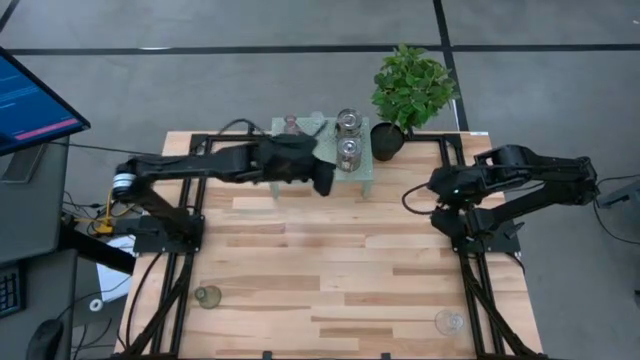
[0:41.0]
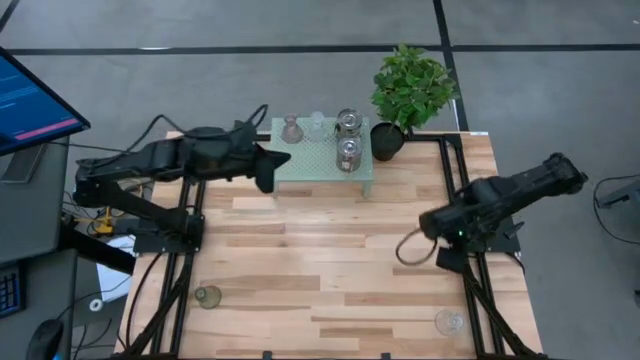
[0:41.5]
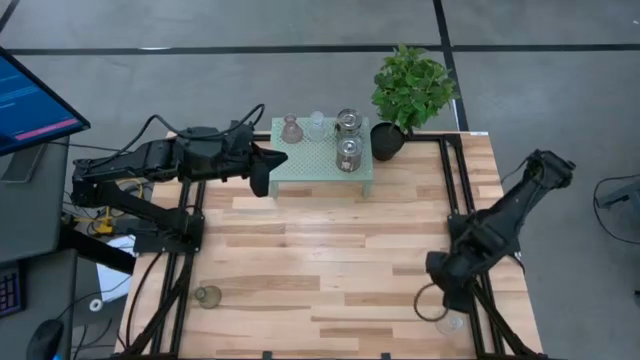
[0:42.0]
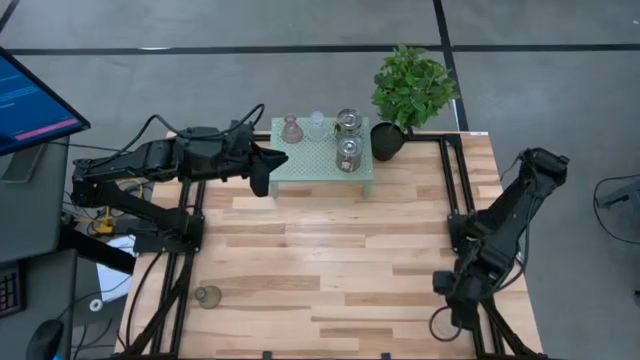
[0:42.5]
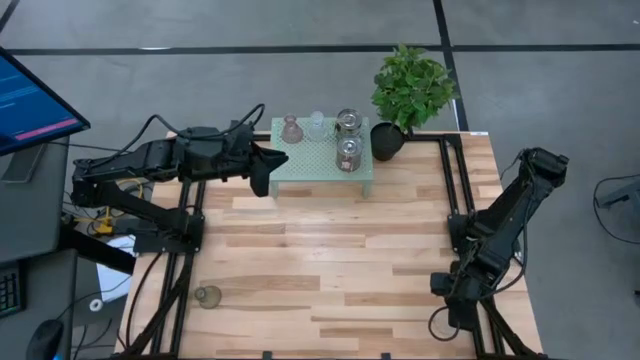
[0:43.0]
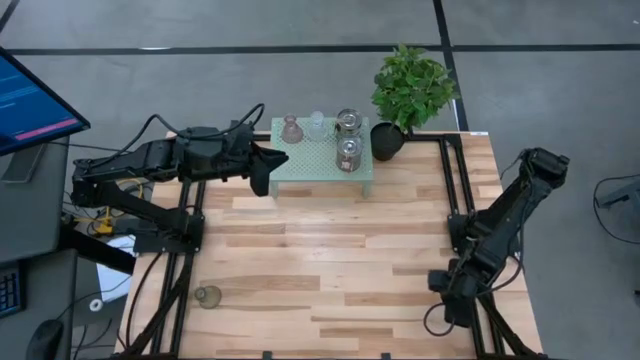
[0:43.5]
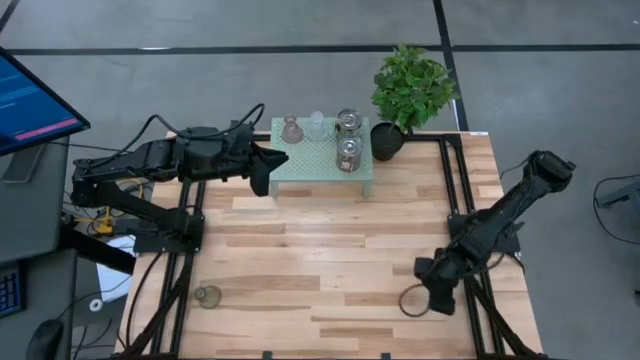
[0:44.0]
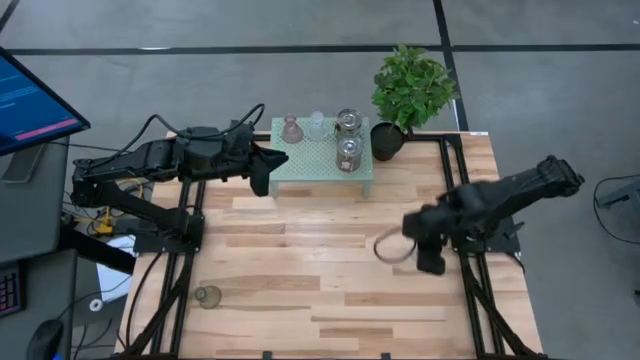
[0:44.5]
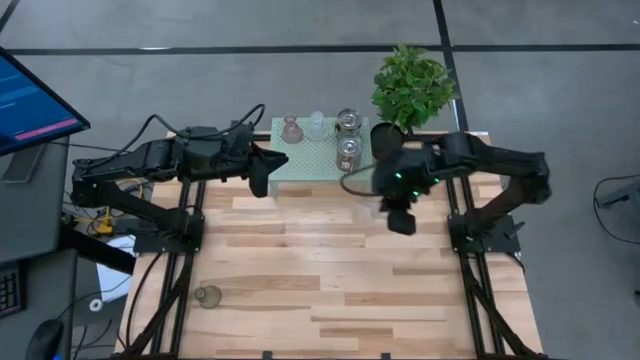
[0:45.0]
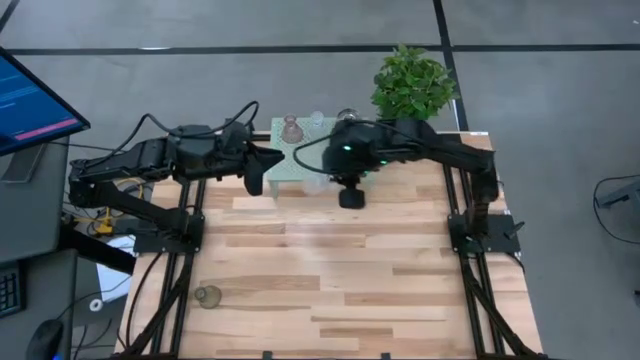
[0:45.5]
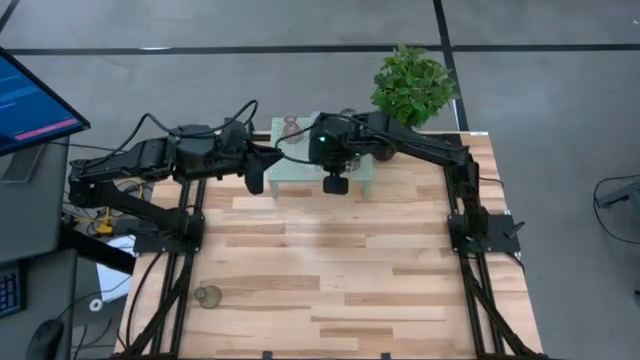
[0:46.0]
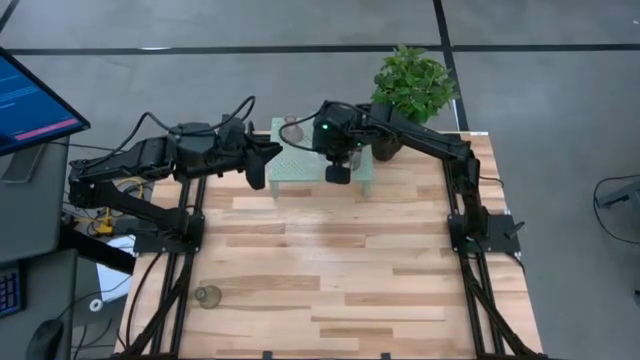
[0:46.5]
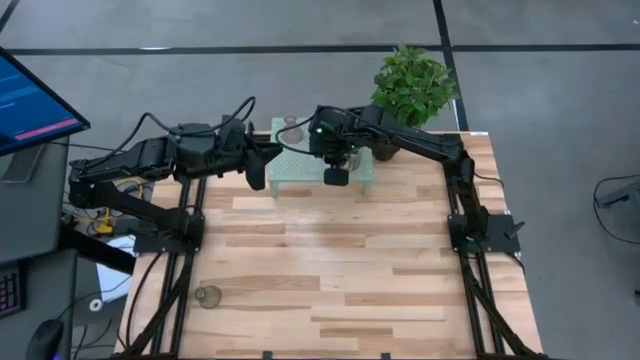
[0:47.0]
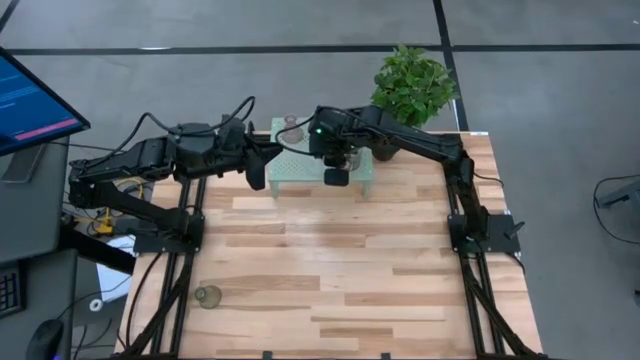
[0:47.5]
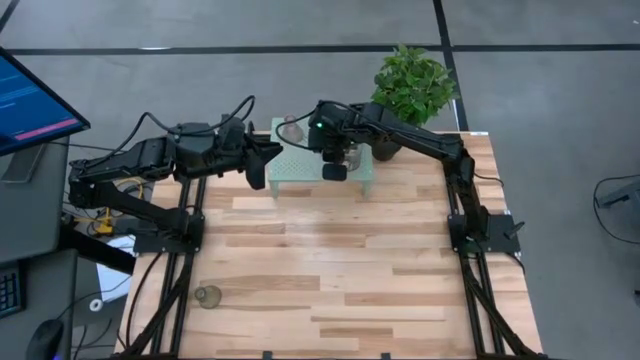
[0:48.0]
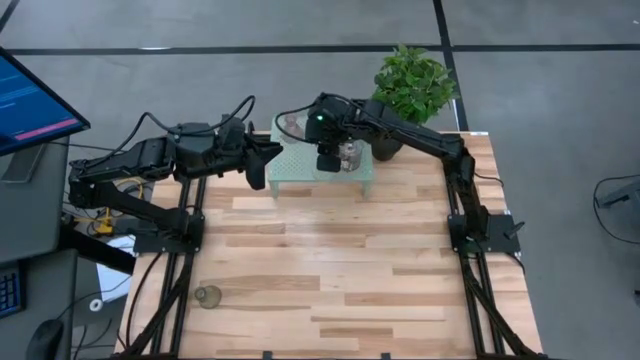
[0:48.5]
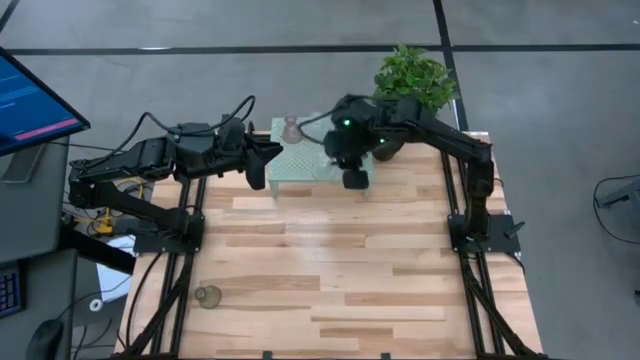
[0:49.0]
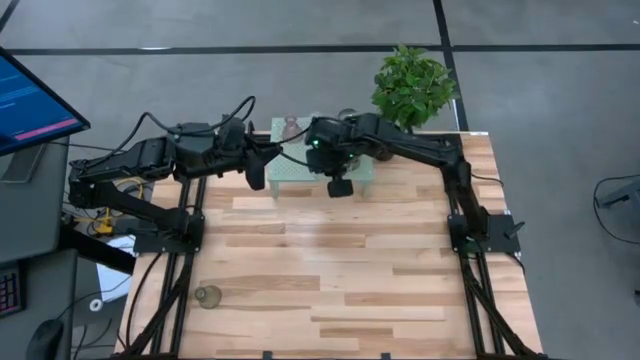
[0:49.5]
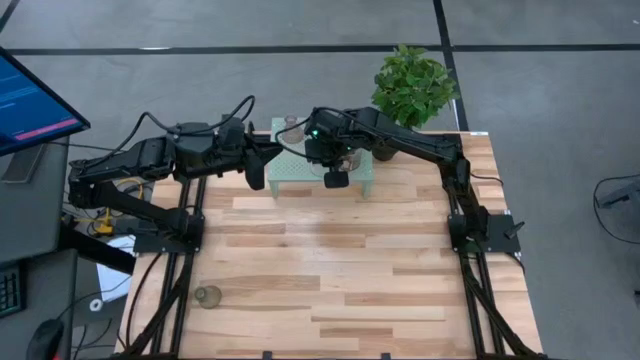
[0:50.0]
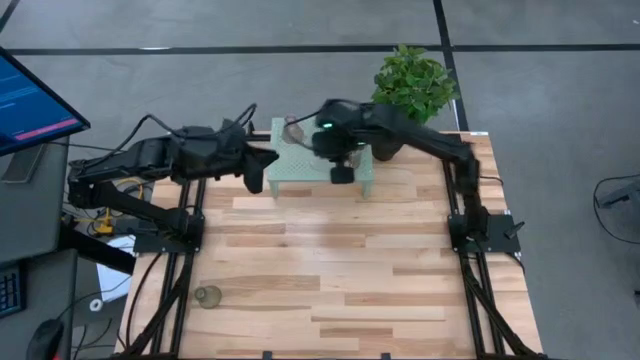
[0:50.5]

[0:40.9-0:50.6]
Task: Pick & Place candle stick holders
Put the transparent vase on the shelf

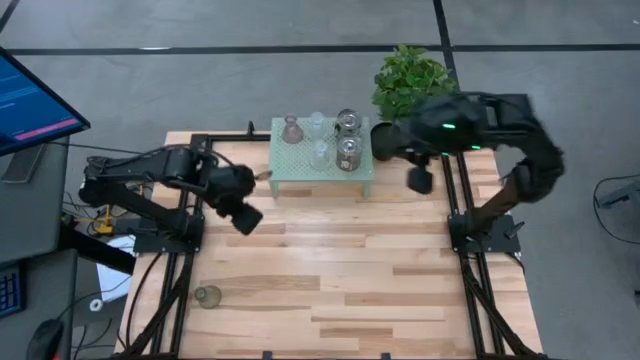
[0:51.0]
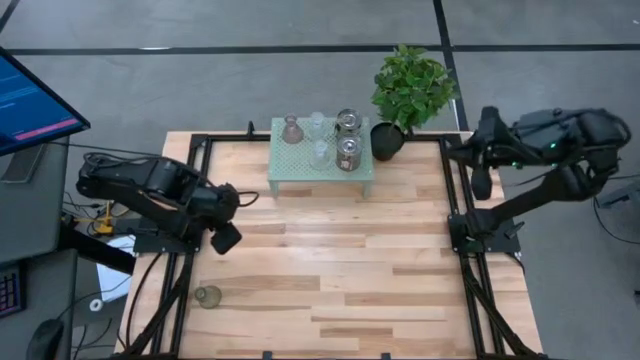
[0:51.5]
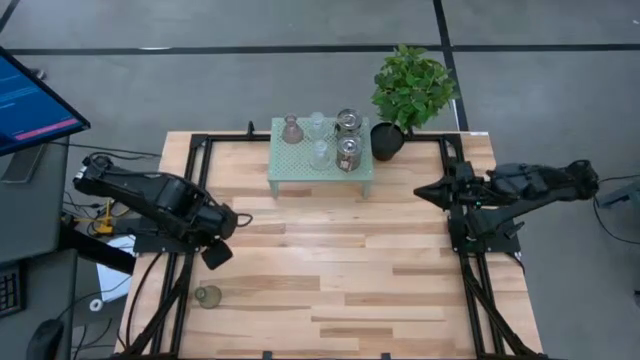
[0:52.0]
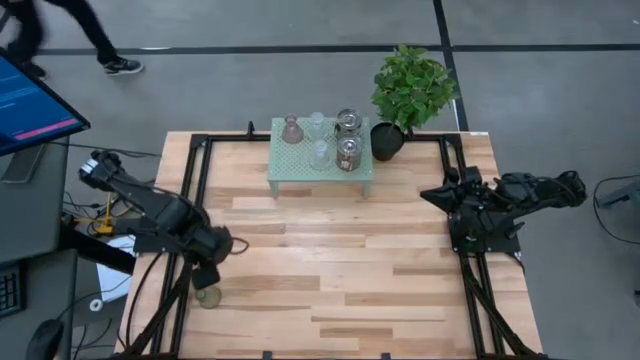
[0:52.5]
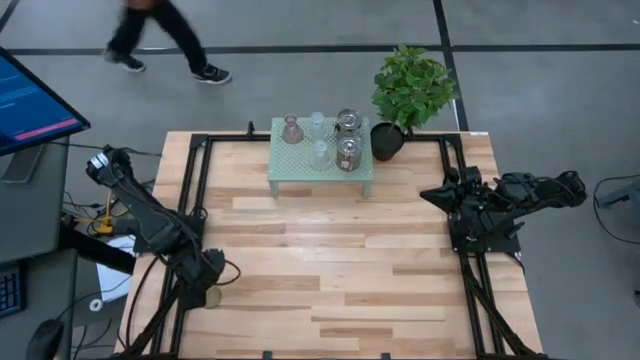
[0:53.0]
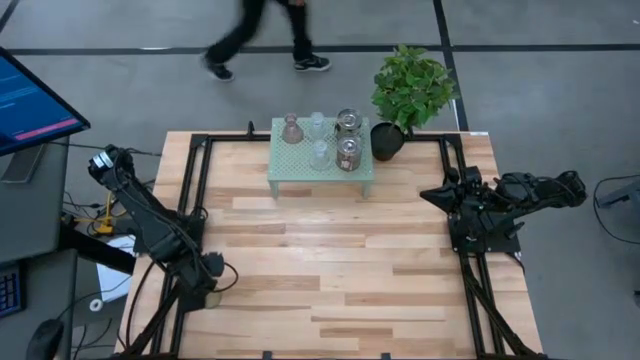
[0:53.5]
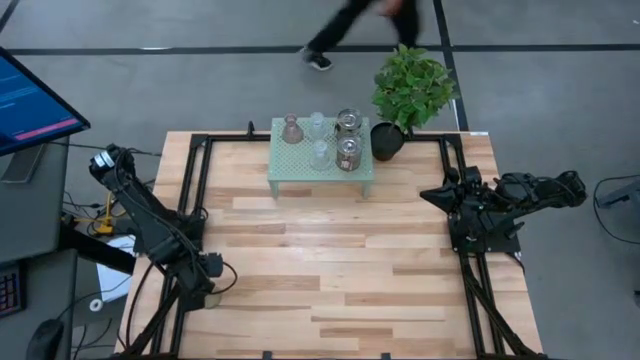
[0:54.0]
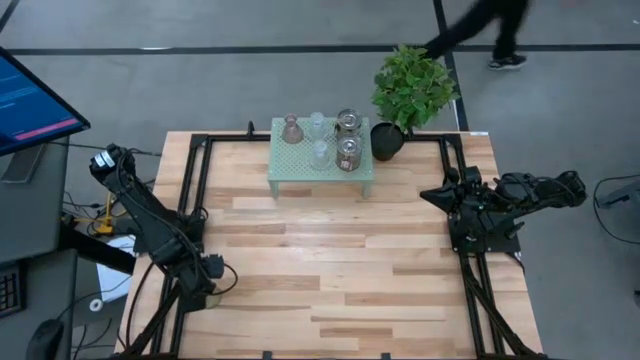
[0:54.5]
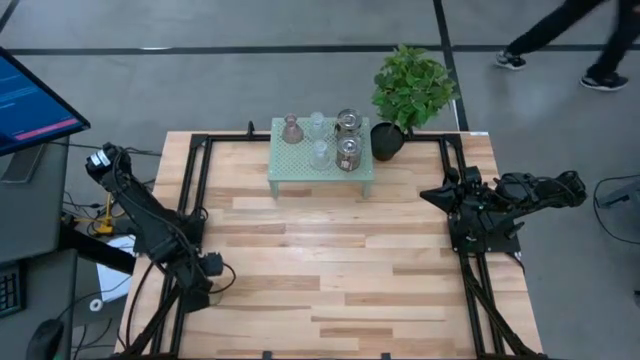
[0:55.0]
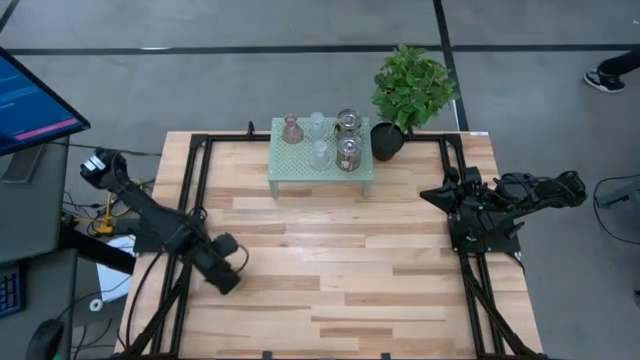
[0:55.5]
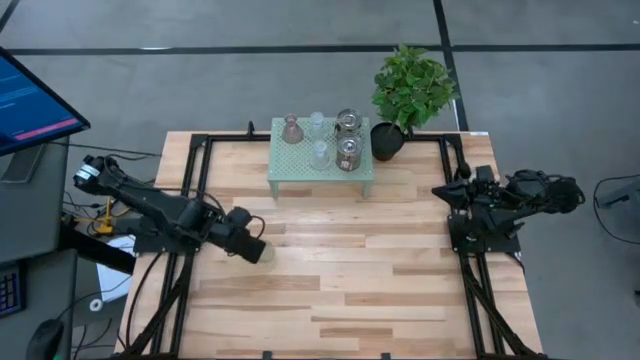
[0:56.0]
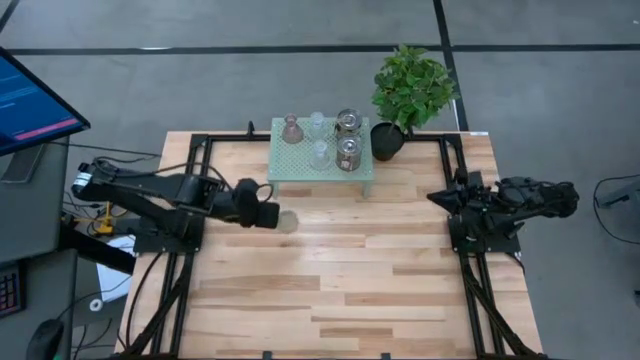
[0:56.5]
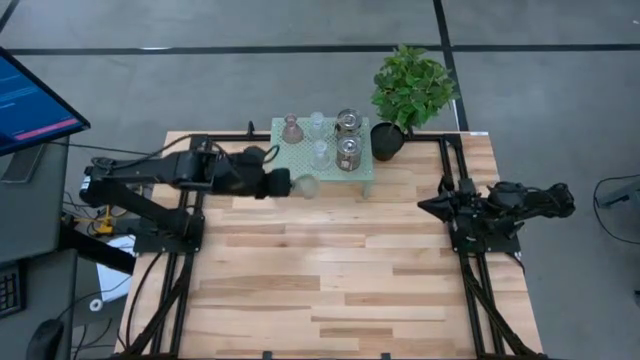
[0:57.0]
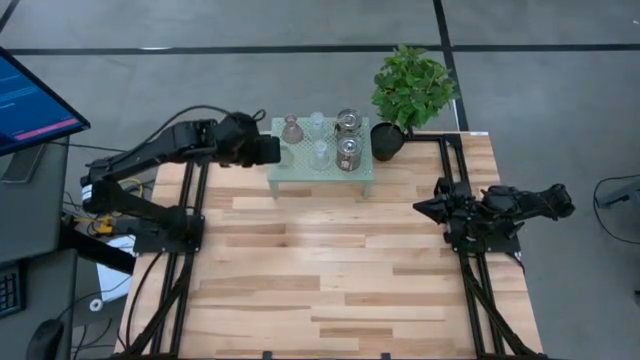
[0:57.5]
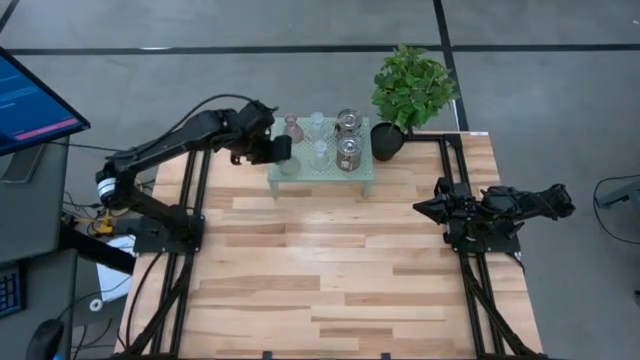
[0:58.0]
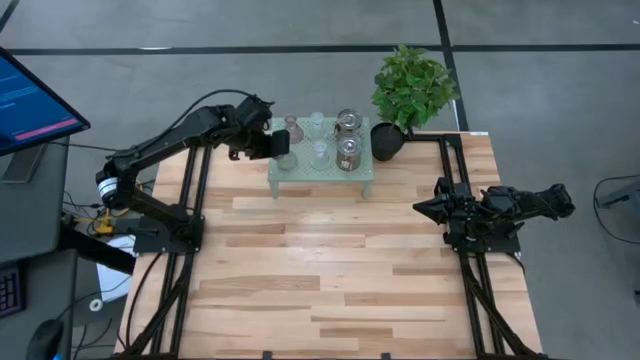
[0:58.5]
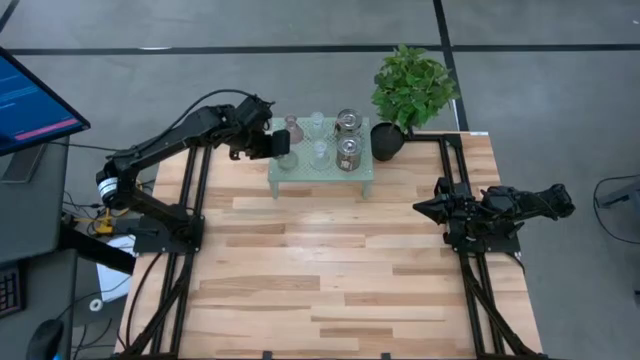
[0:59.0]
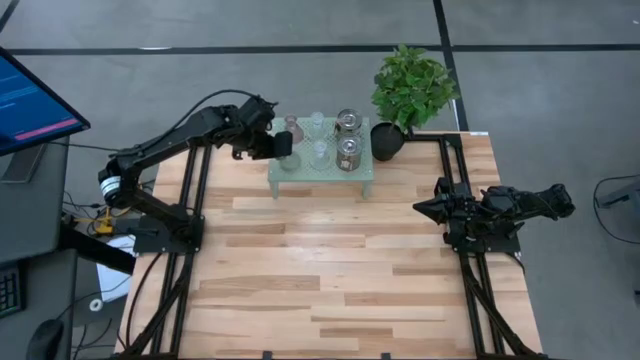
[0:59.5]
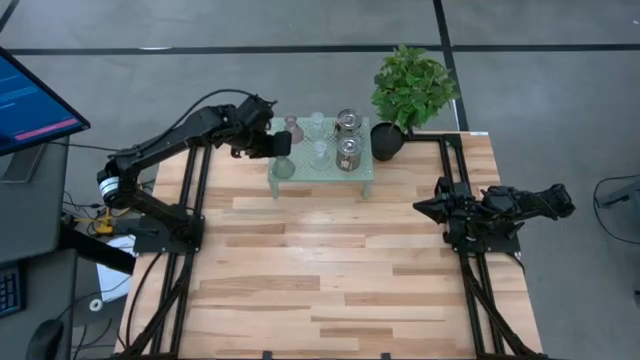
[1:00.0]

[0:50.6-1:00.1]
Put the pink vase on the shelf

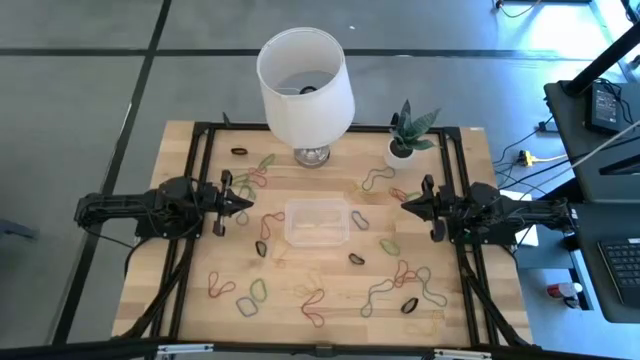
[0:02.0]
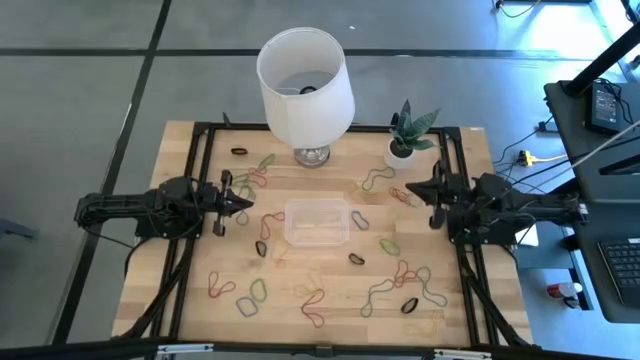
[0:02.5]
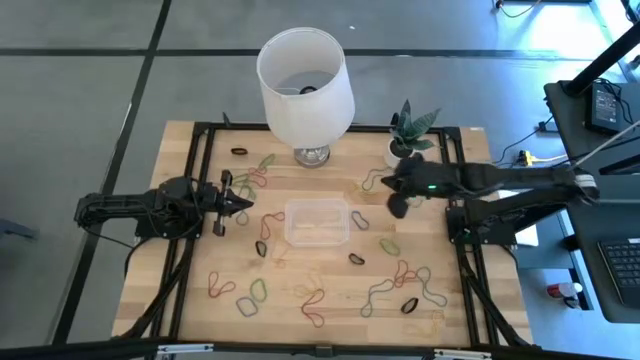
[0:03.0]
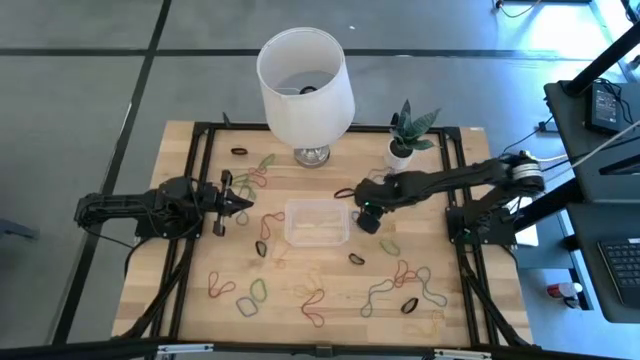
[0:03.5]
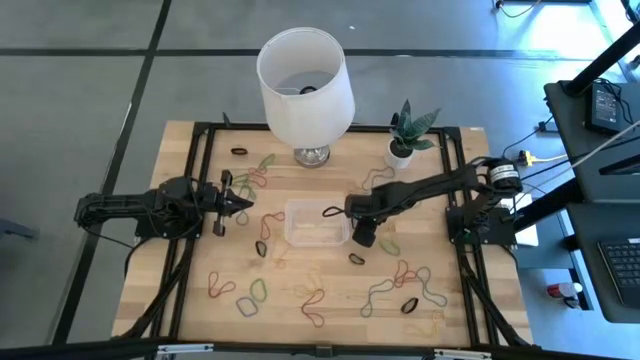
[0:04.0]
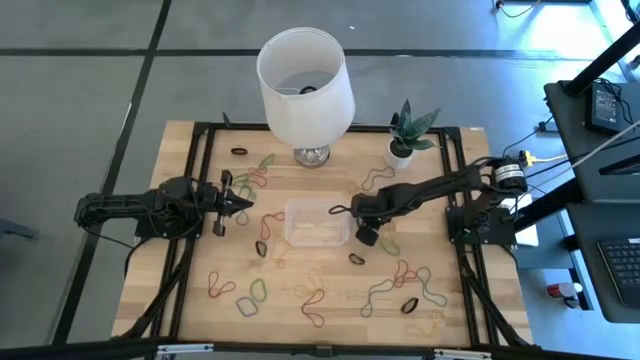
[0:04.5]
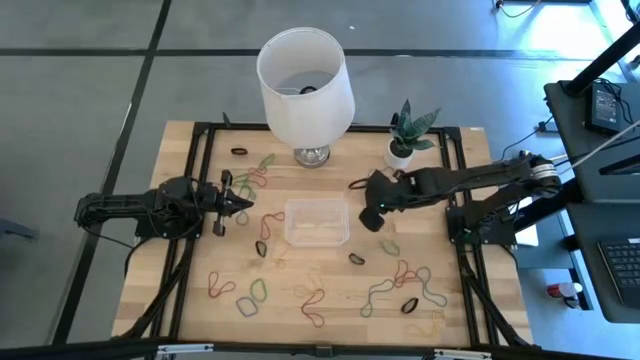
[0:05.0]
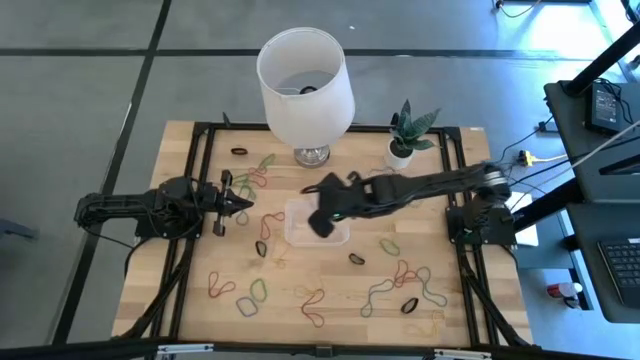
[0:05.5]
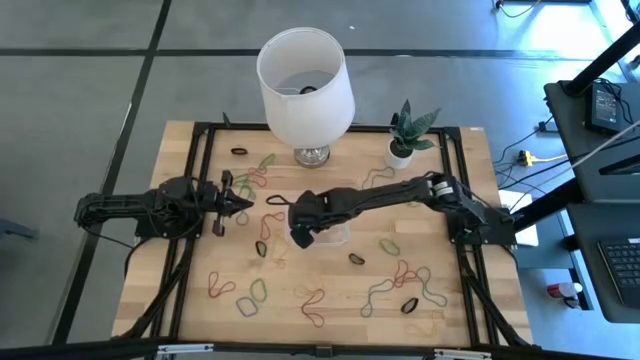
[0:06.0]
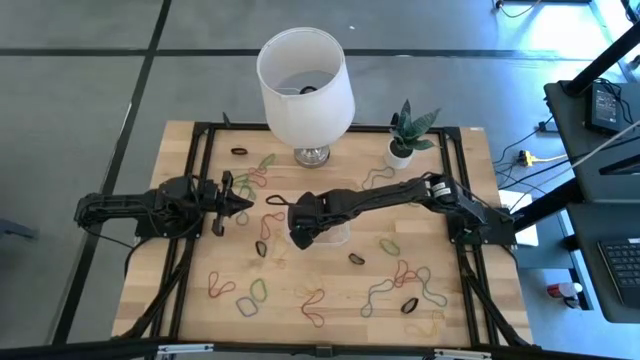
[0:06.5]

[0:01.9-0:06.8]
Task: Pick and place rubber bands into bin
Put the blue rubber band into the transparent bin
